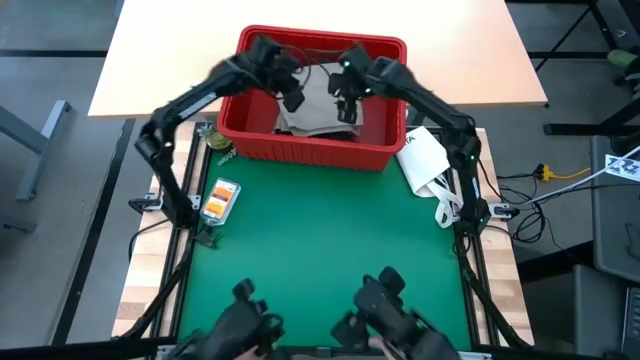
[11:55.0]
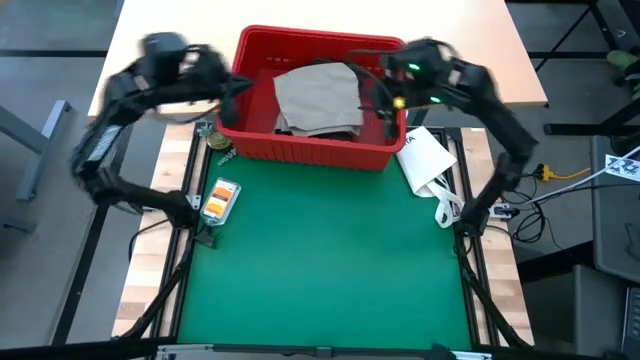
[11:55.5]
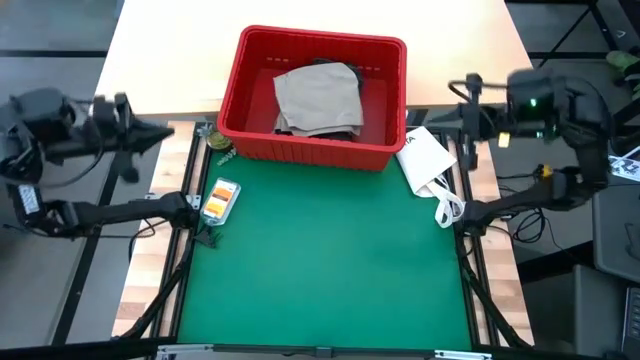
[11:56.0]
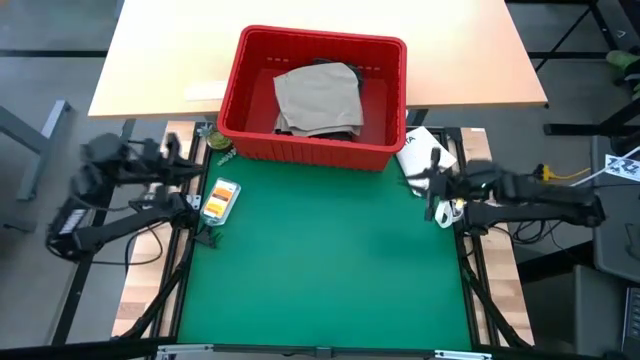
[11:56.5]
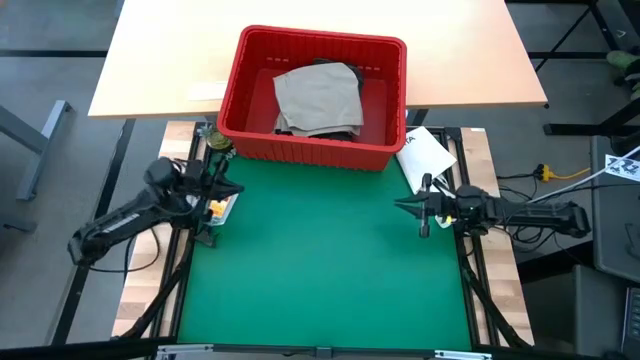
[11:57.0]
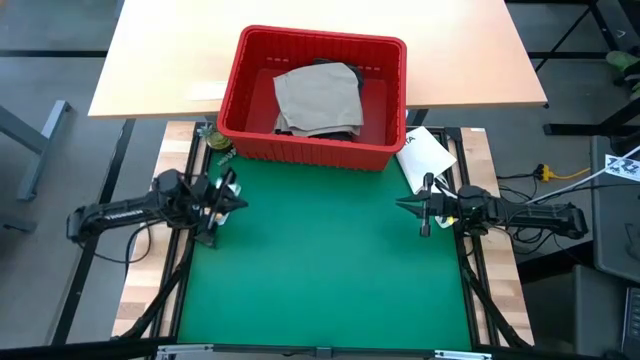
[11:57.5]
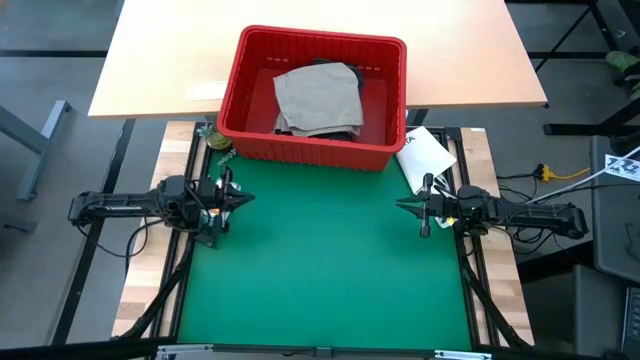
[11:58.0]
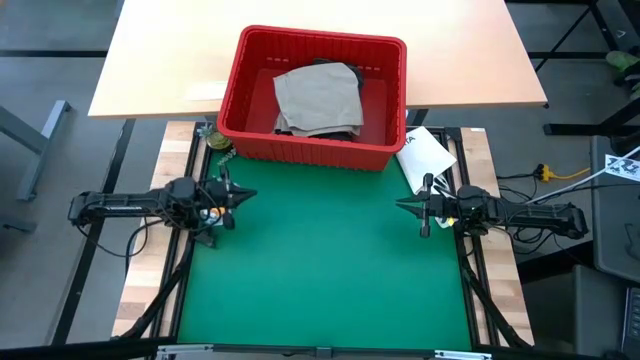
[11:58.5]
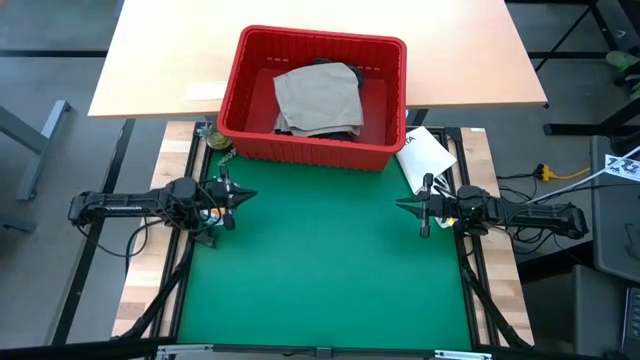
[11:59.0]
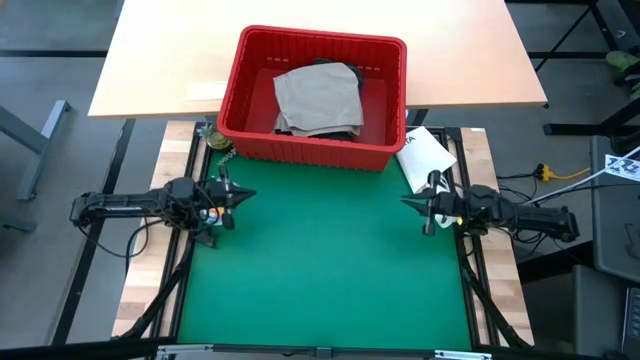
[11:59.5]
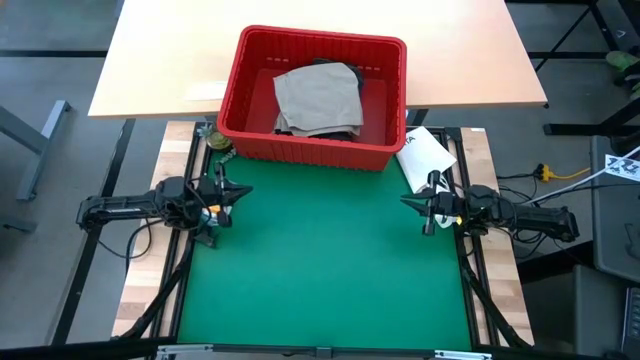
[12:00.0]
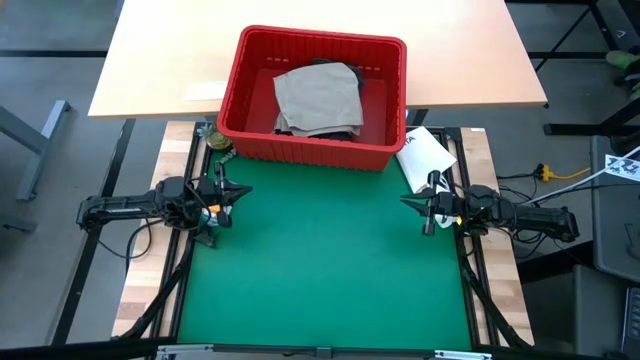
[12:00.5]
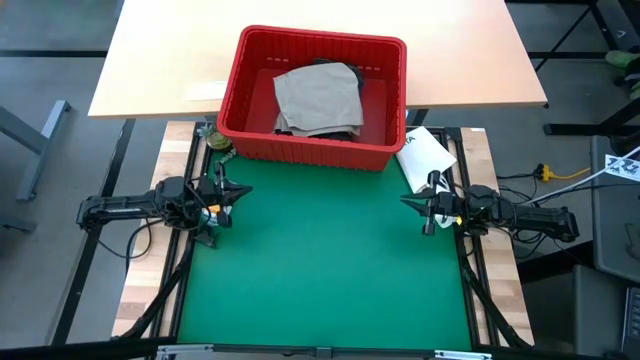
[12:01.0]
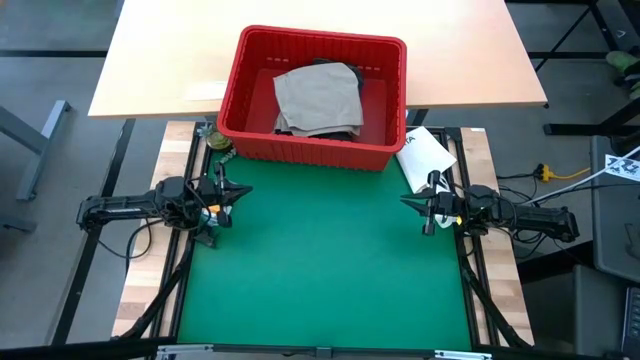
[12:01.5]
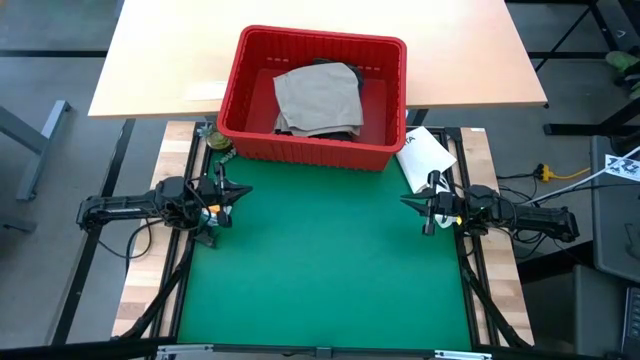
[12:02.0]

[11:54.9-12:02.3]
Task: Fold Laundry from Bin
Return to Home Position

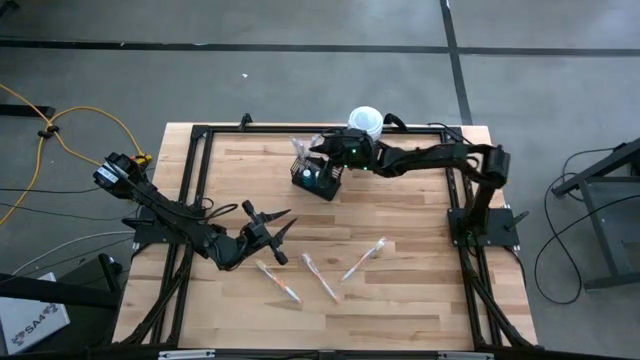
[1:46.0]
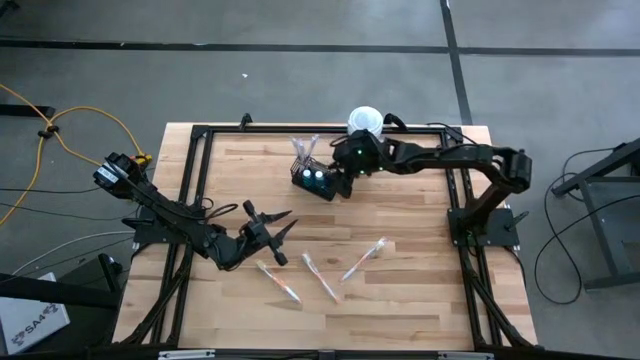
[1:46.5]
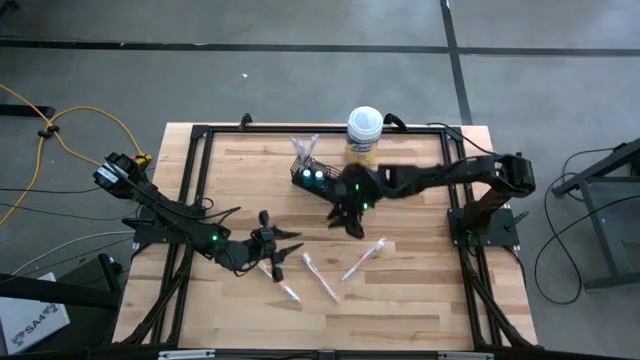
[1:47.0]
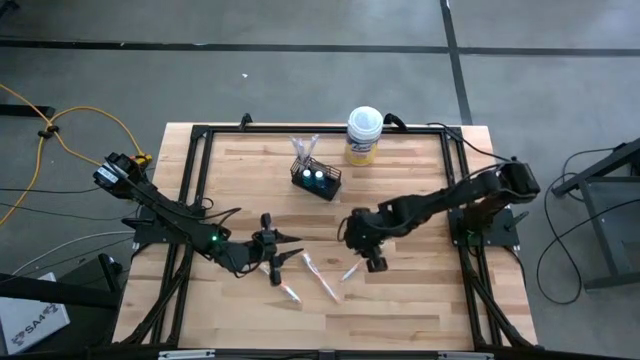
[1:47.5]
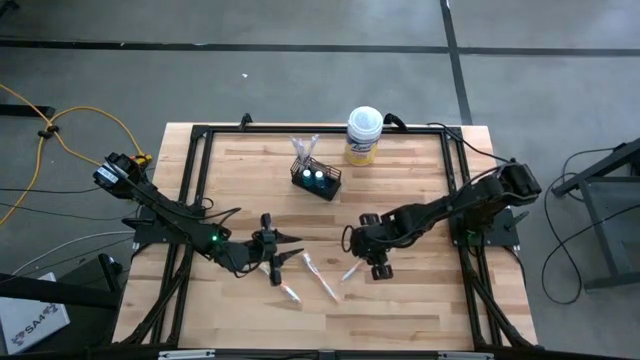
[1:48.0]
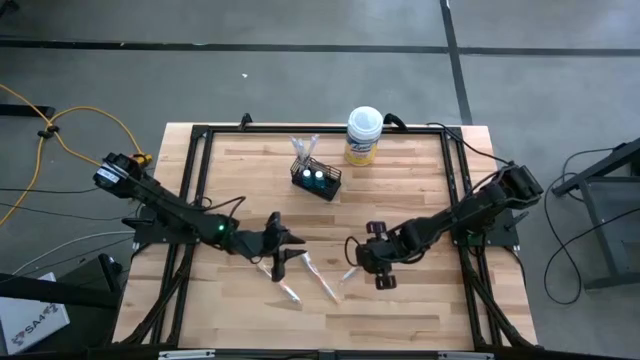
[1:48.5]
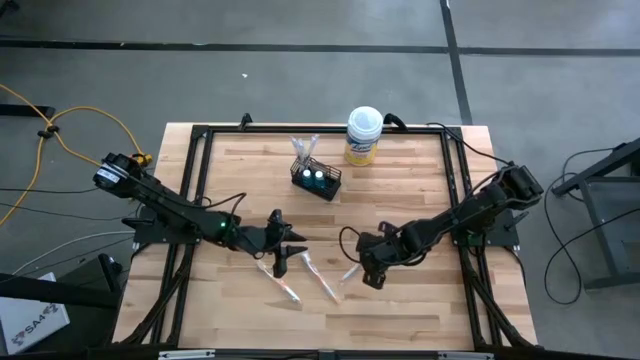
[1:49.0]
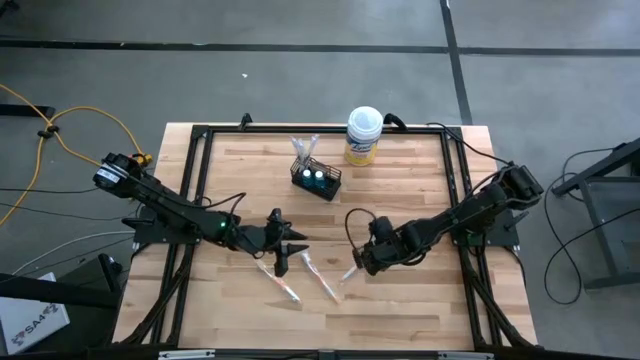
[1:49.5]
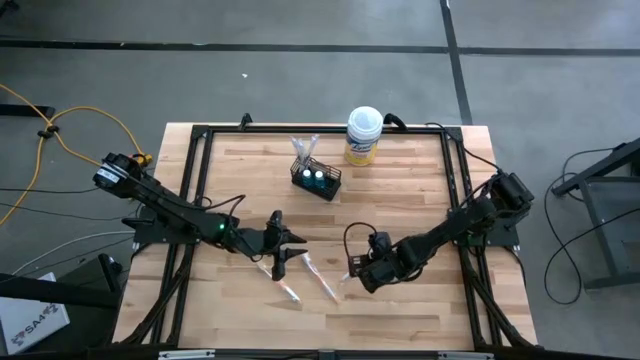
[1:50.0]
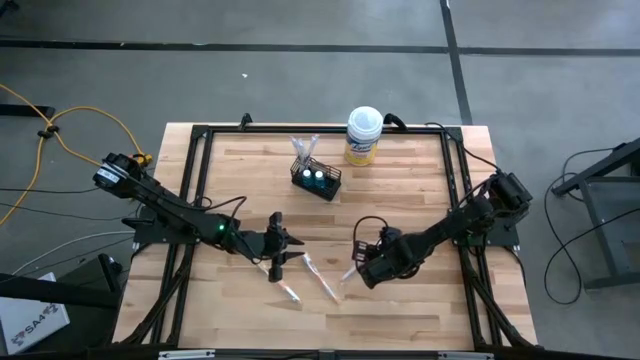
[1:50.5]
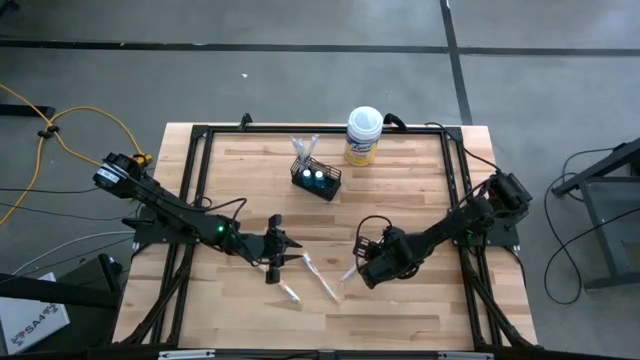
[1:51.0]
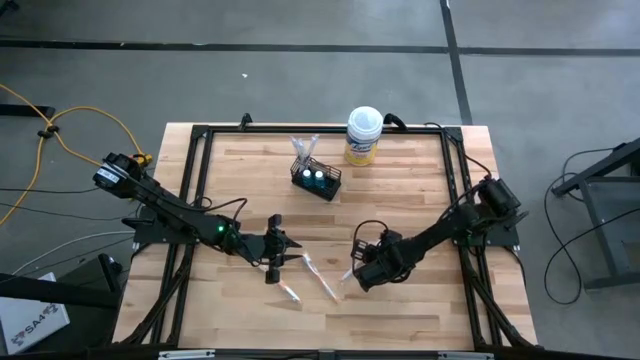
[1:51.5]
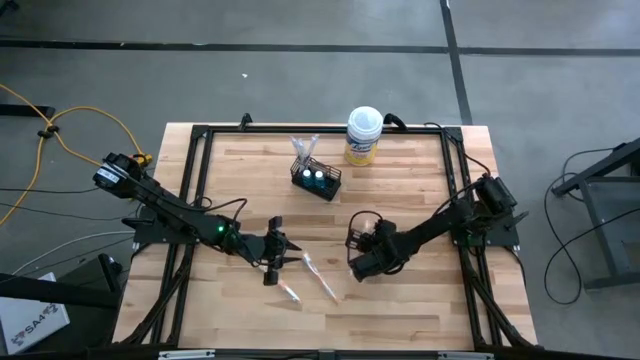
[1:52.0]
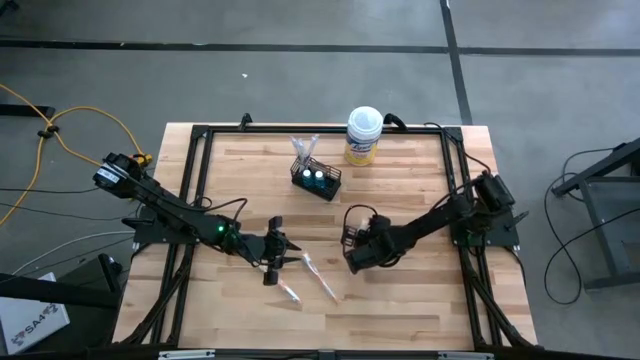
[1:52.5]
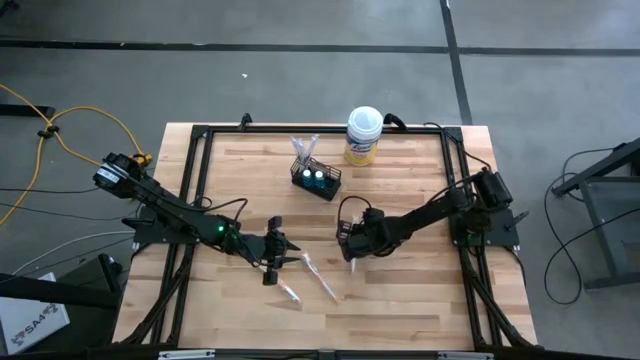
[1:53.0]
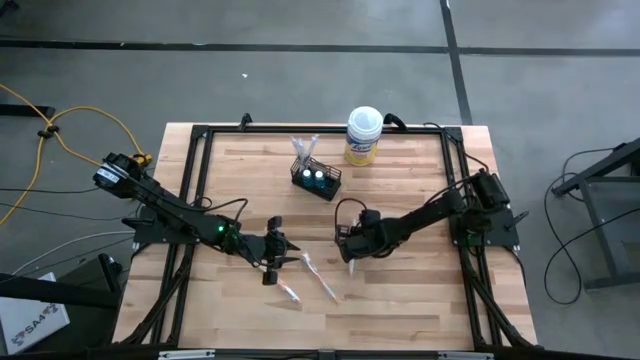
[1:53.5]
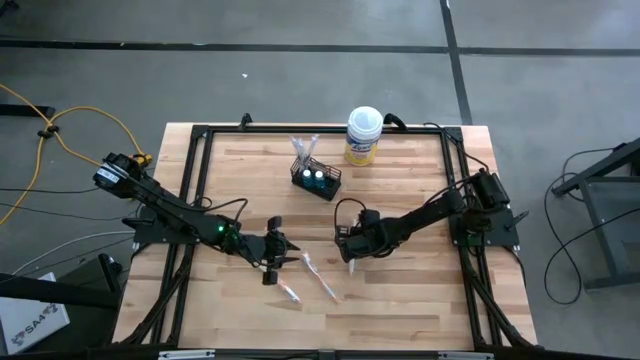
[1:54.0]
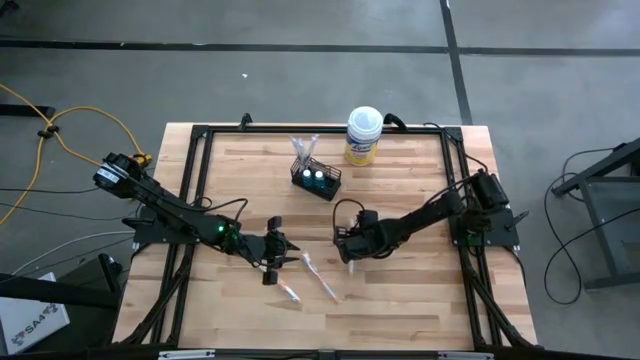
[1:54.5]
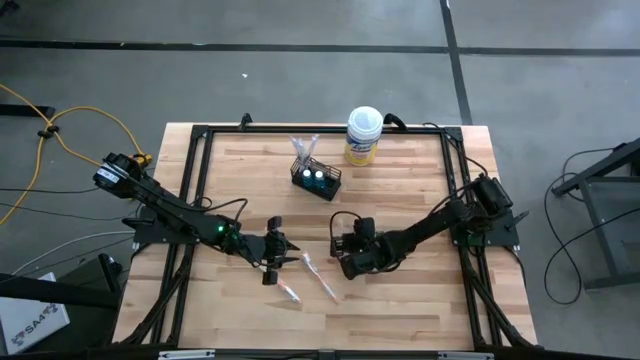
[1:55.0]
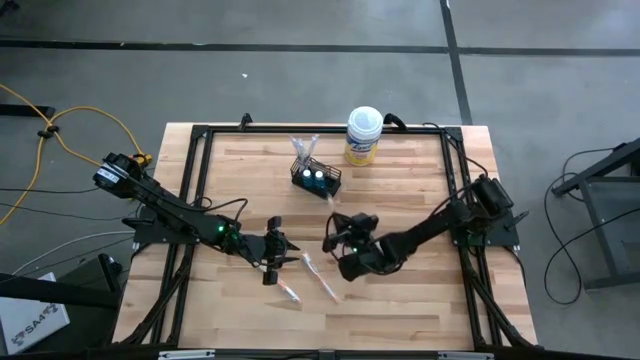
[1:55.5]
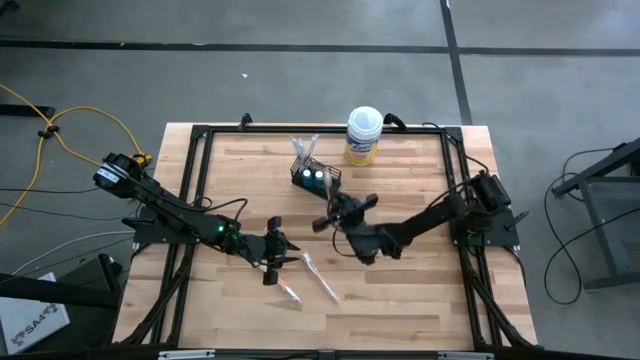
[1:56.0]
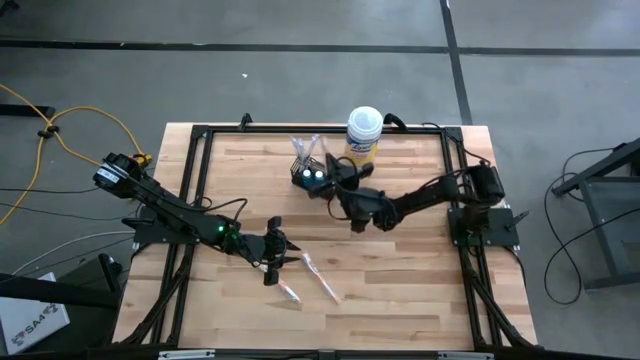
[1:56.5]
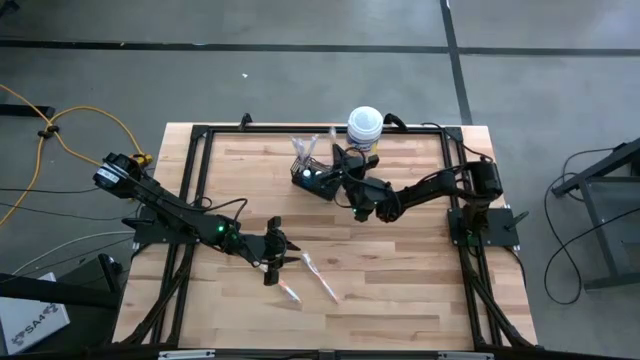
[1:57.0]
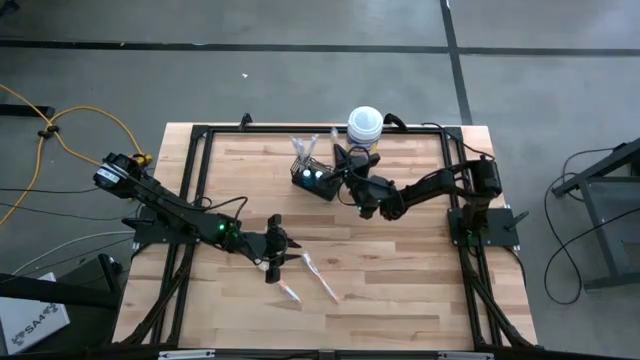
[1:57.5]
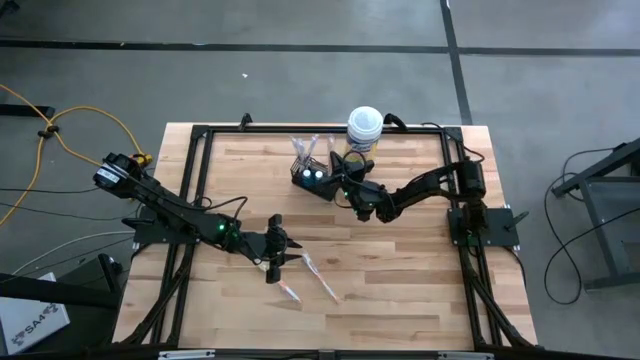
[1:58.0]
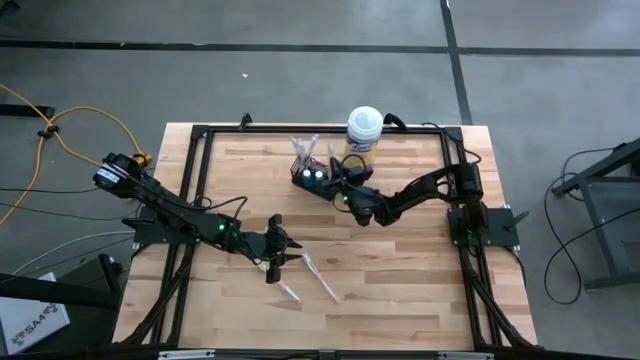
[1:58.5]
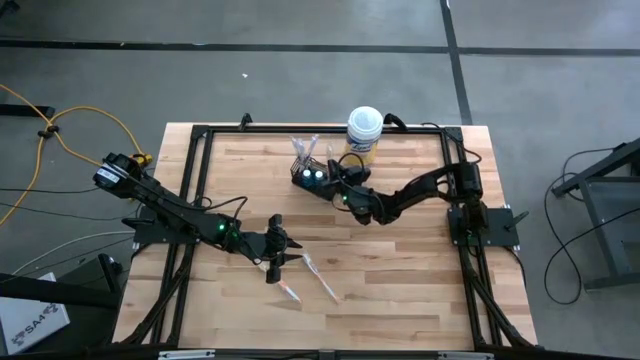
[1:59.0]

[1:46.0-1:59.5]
Task: Pick & Place toothbrushing station
Put the right orange toothbrush into the black mesh organizer
